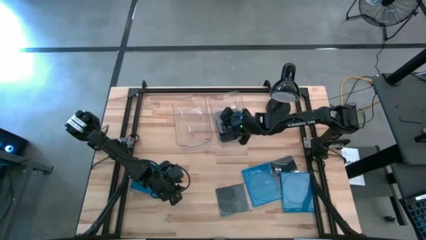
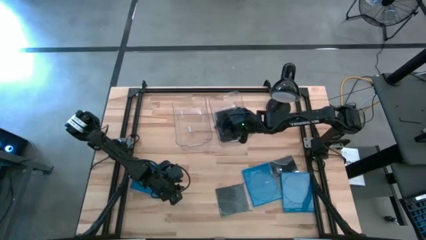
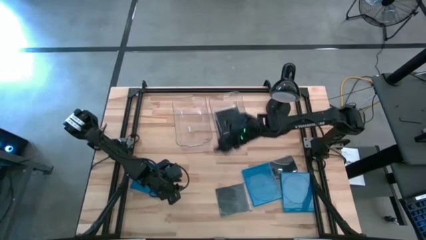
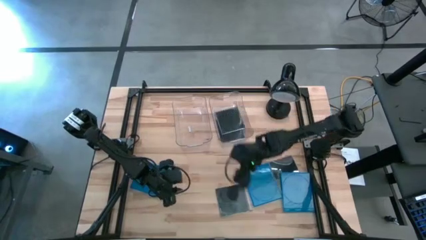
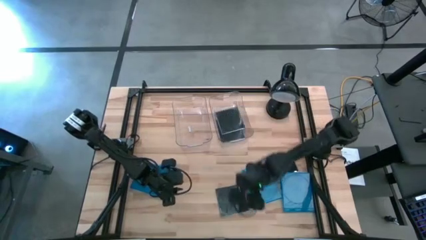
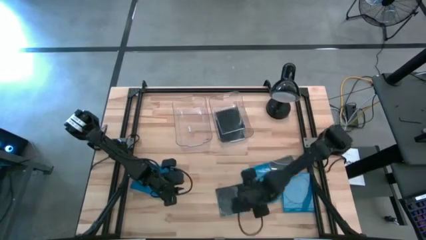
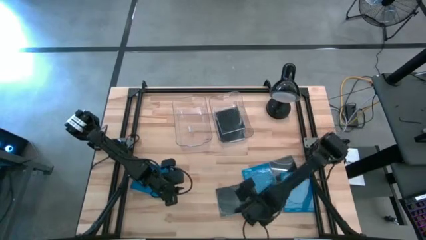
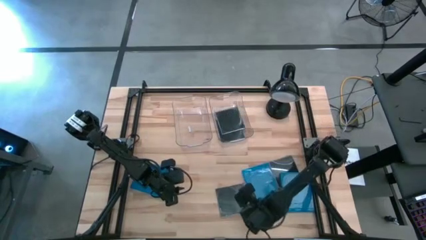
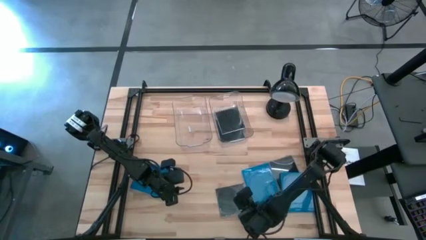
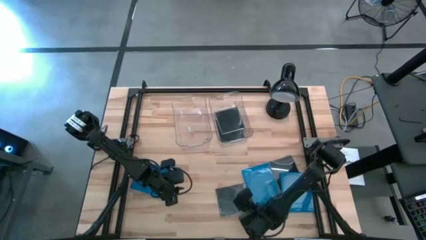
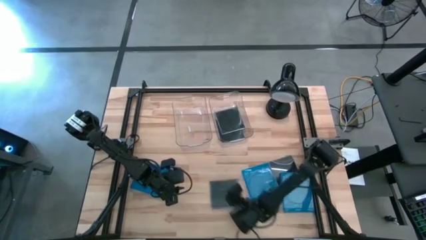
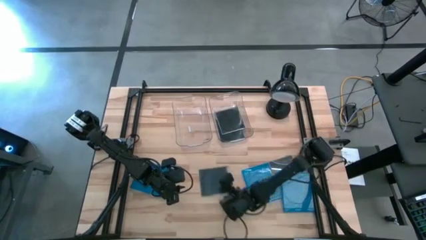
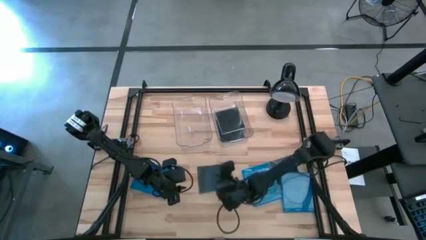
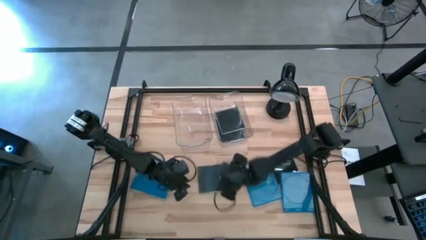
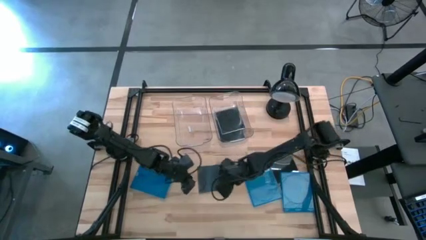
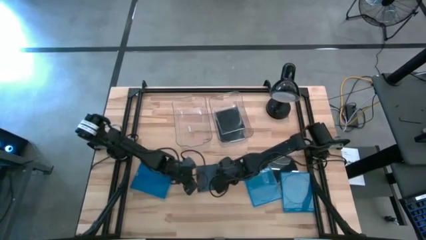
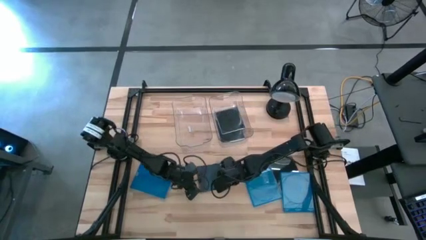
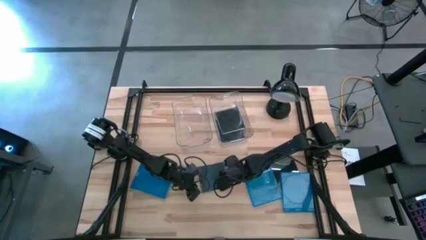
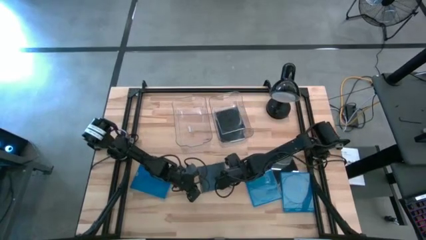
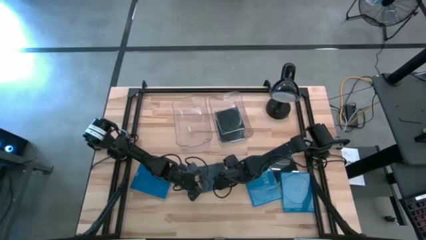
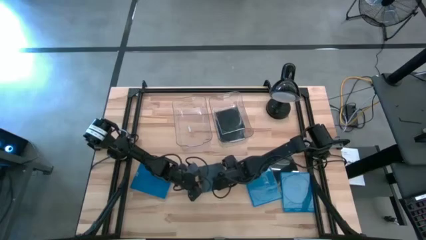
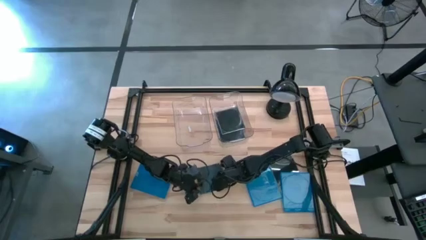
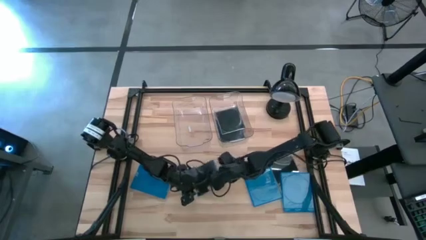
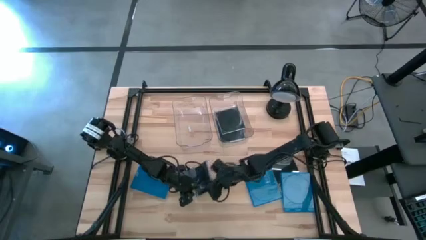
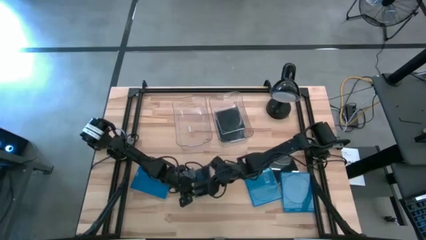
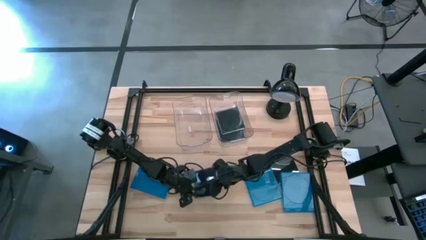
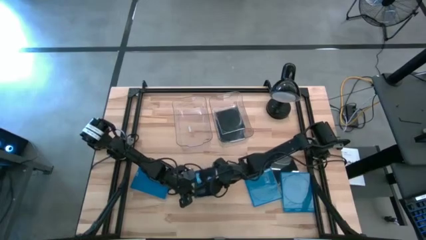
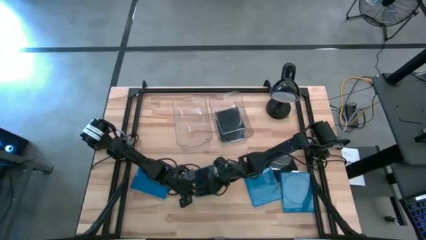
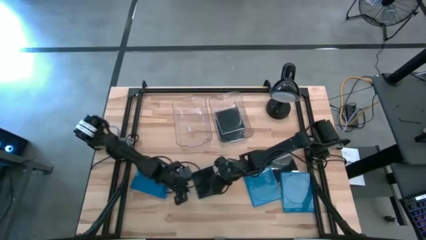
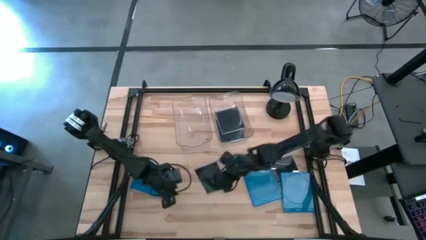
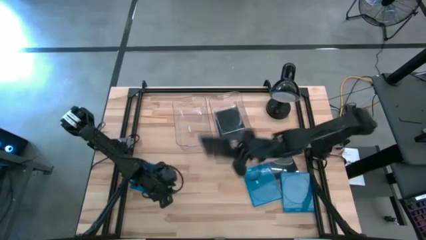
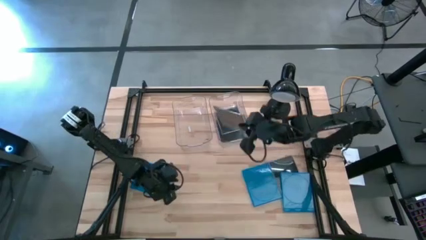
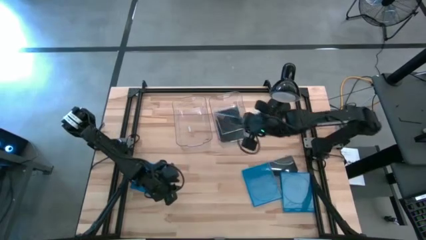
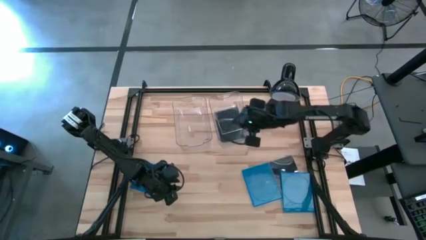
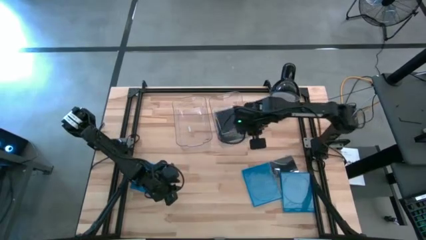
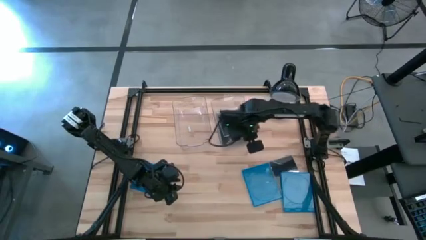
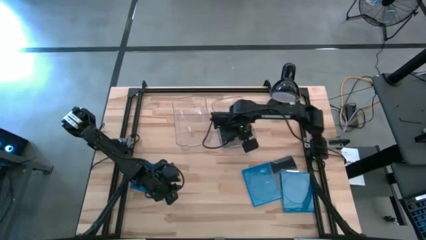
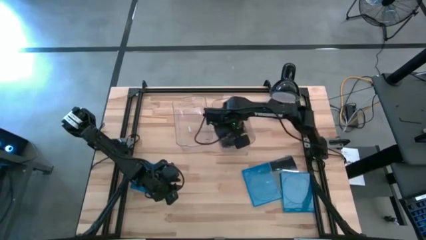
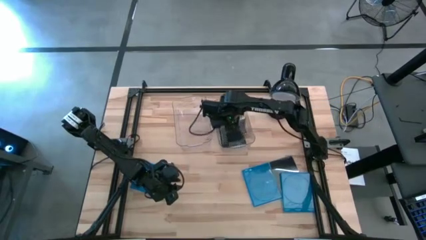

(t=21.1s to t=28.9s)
Task: Pick & place jewel cases by type
Put the black CD case into the right transparent bin

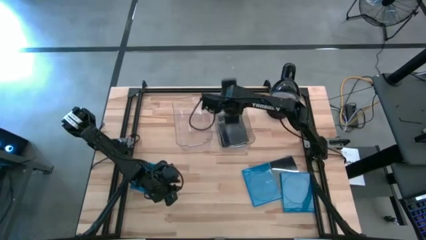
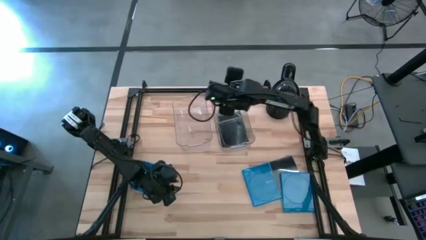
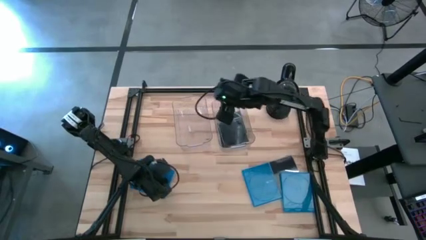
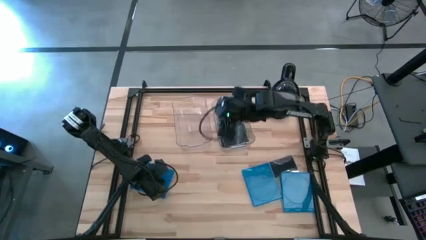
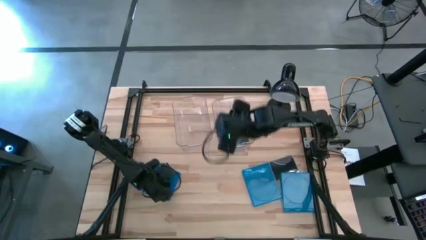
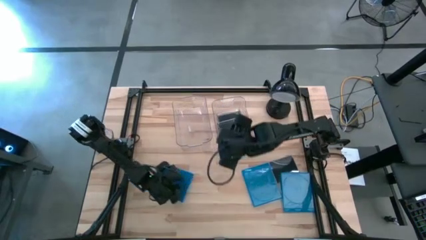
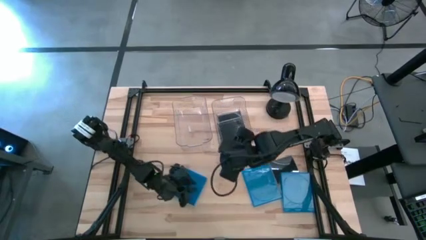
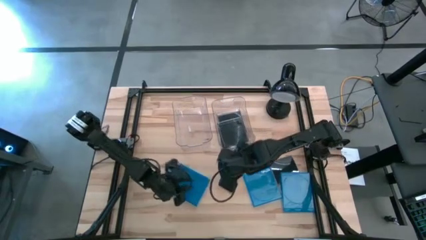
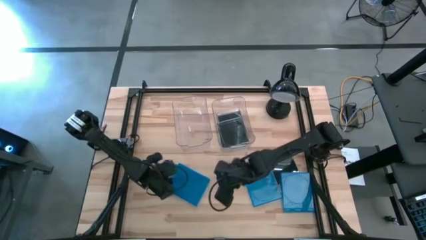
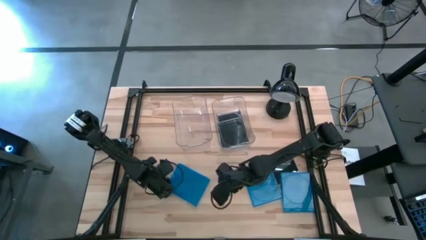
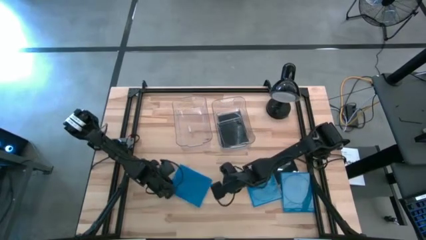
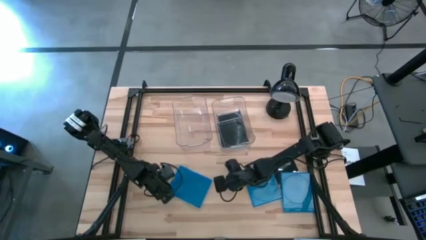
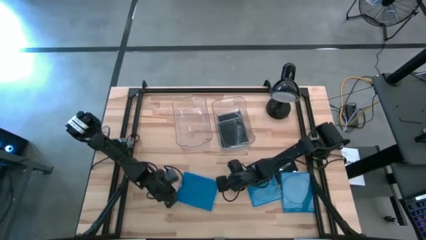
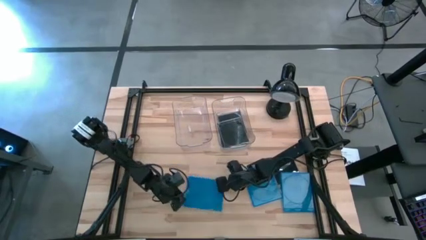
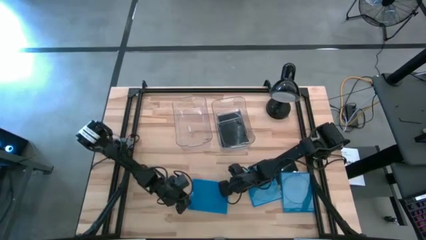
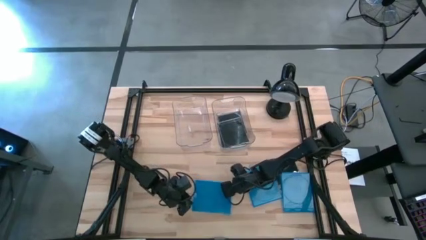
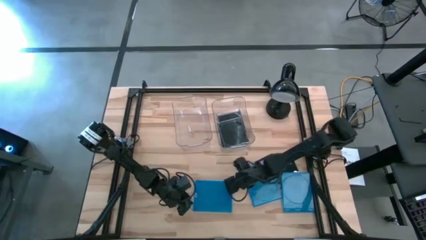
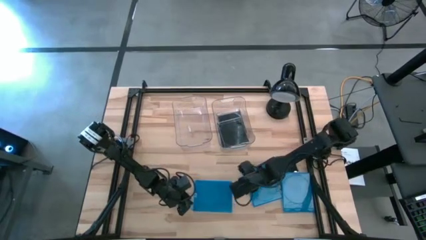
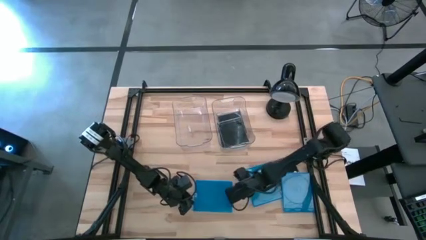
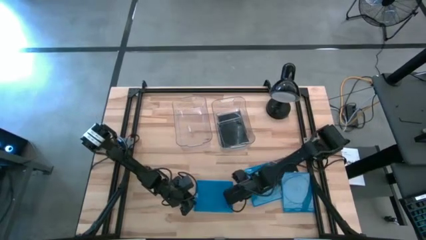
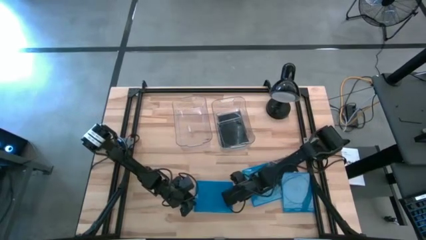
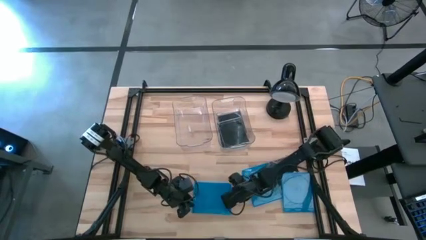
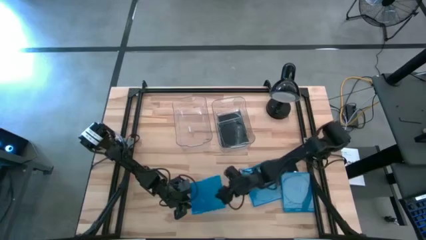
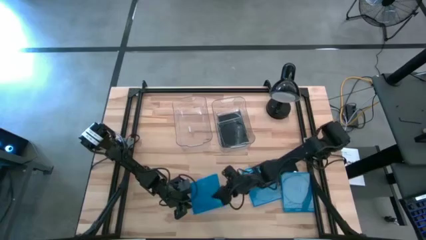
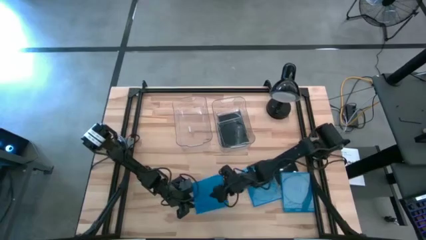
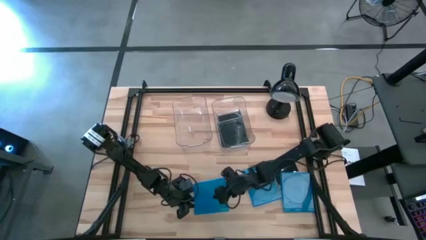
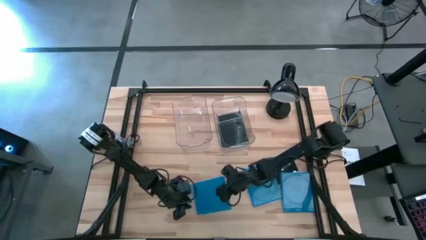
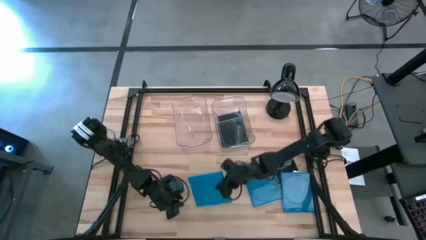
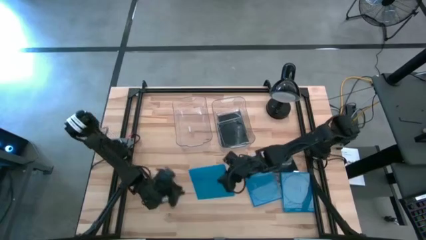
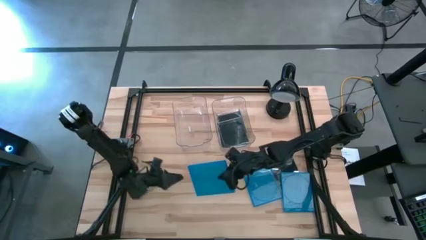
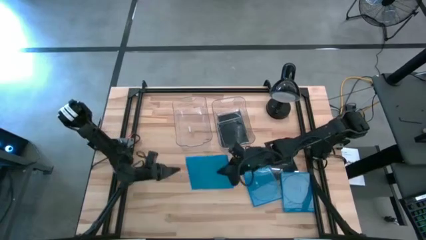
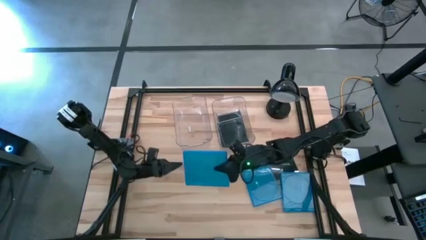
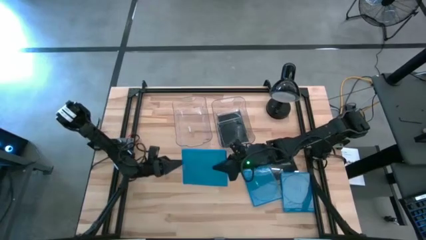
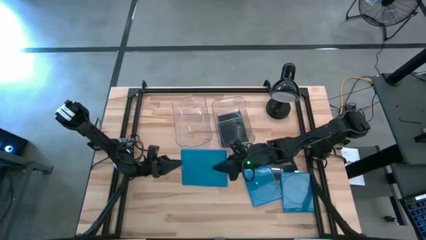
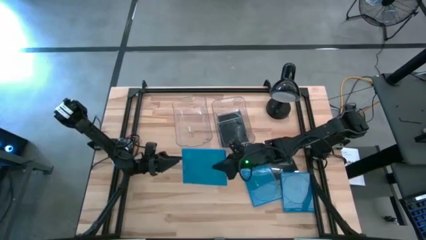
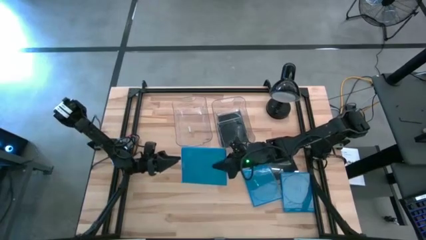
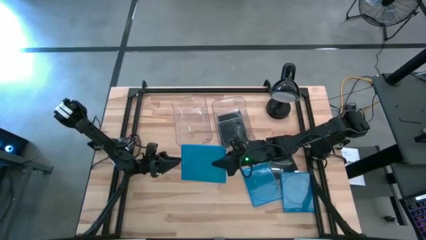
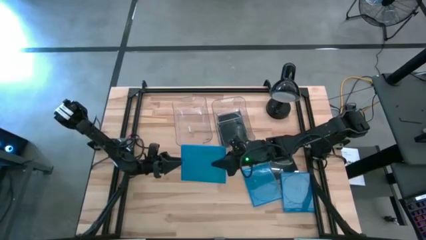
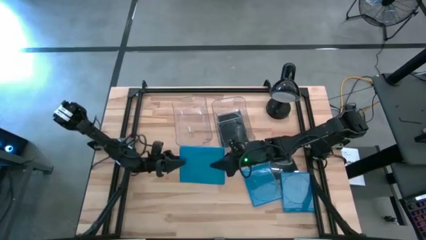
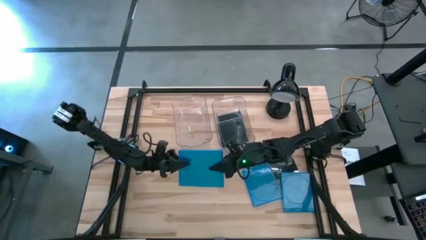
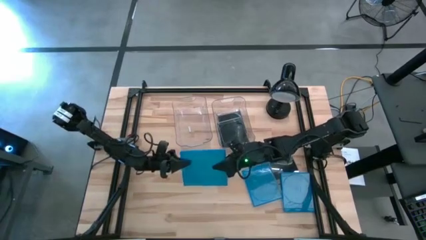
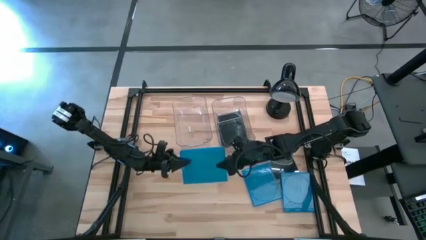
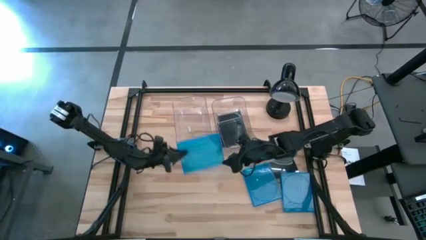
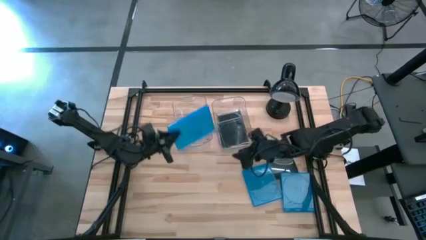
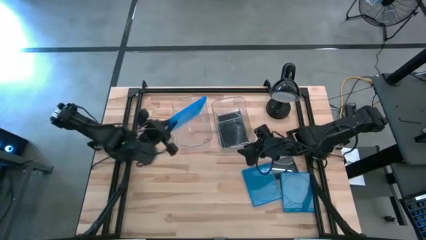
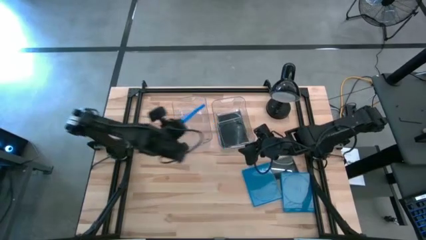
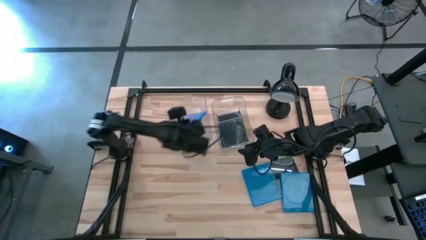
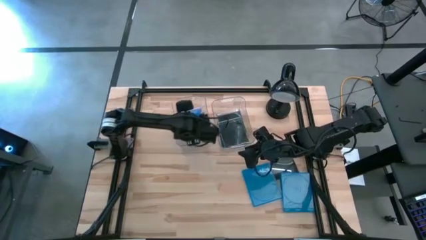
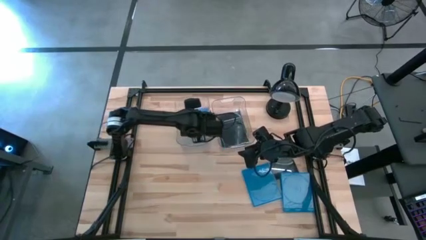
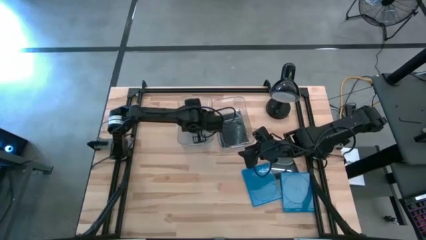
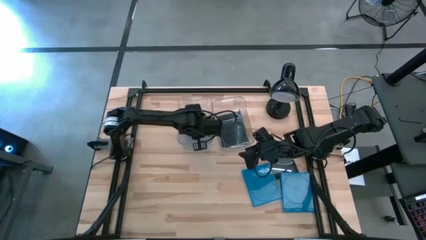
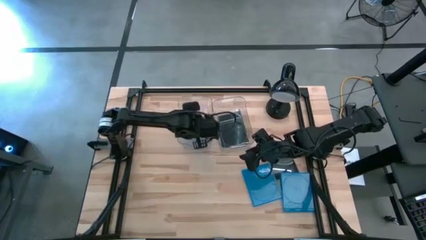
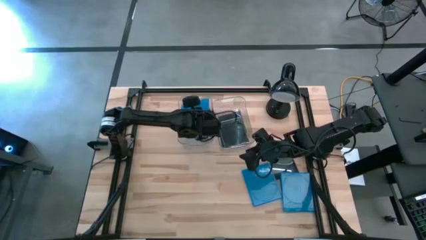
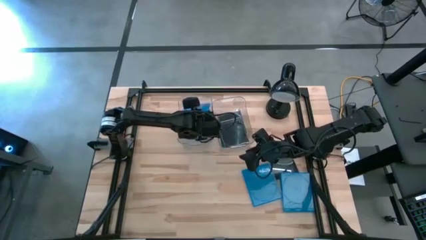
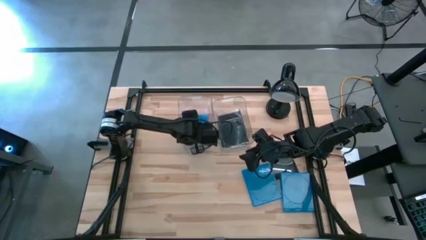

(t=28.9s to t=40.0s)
Put the blue CD case into the left transparent bin
